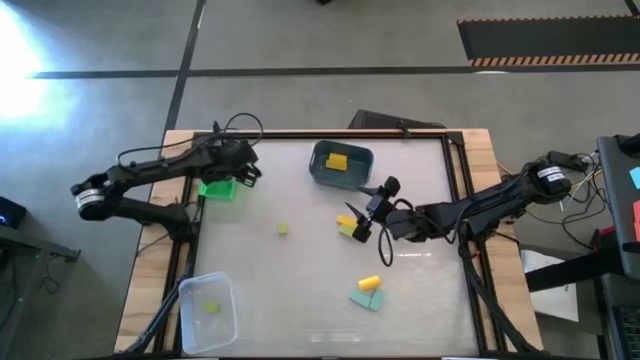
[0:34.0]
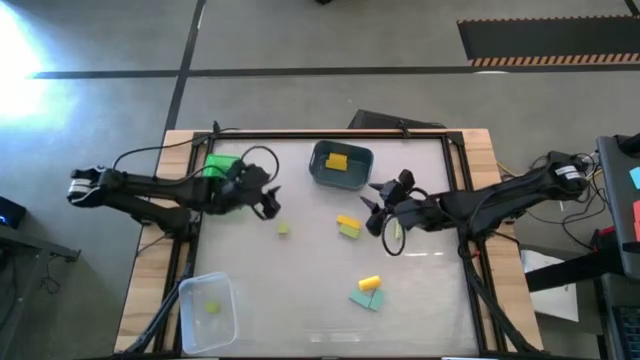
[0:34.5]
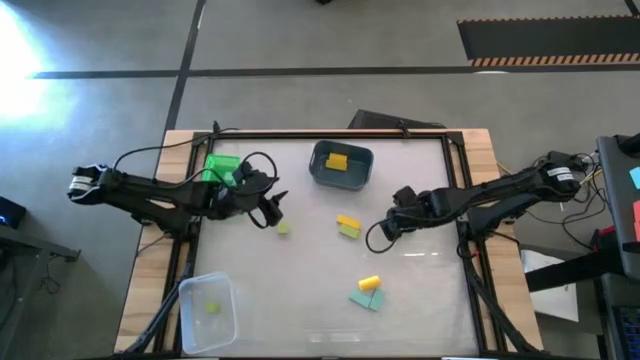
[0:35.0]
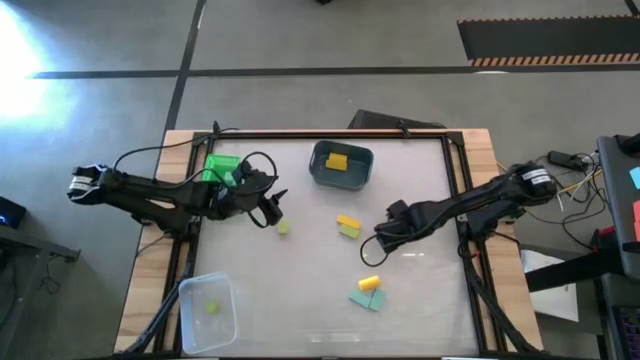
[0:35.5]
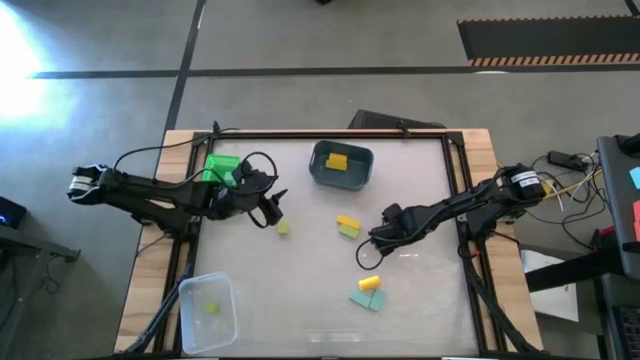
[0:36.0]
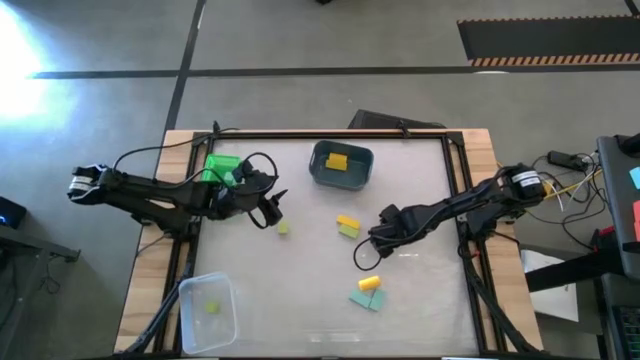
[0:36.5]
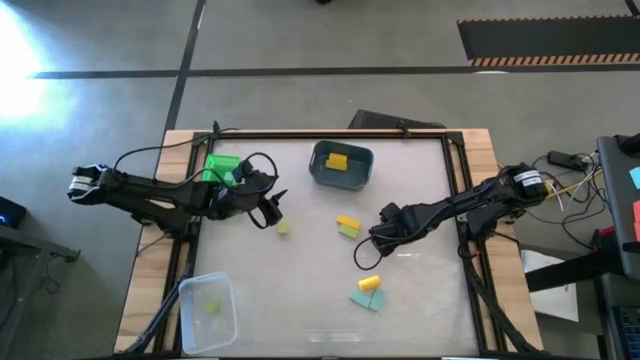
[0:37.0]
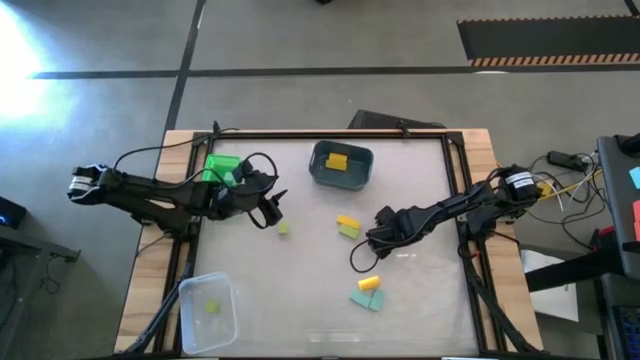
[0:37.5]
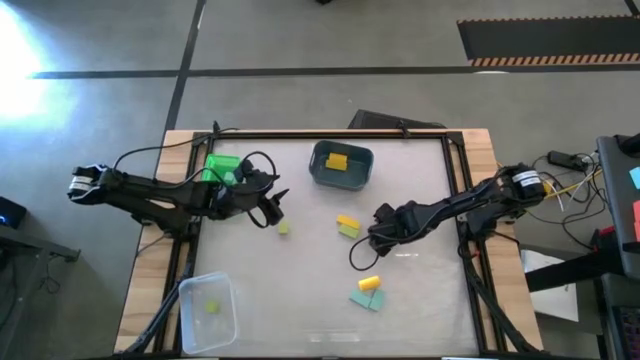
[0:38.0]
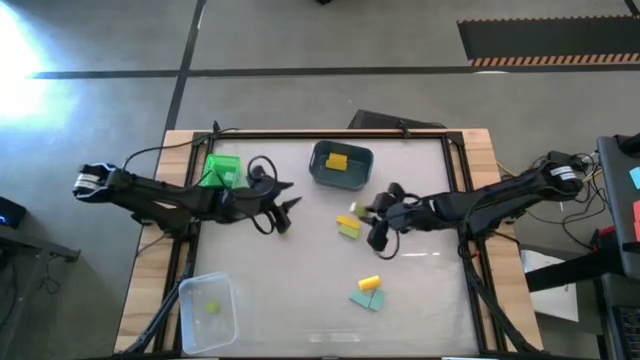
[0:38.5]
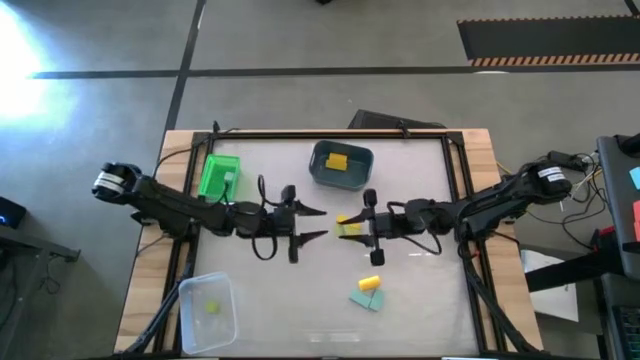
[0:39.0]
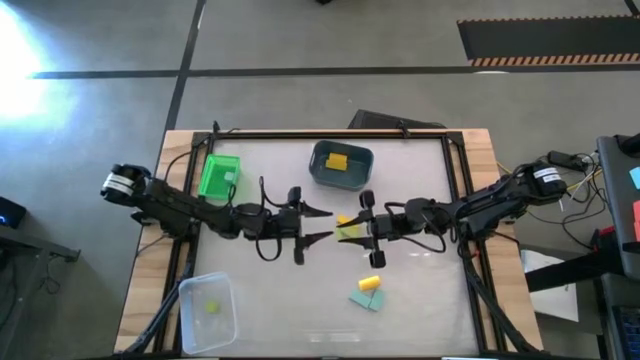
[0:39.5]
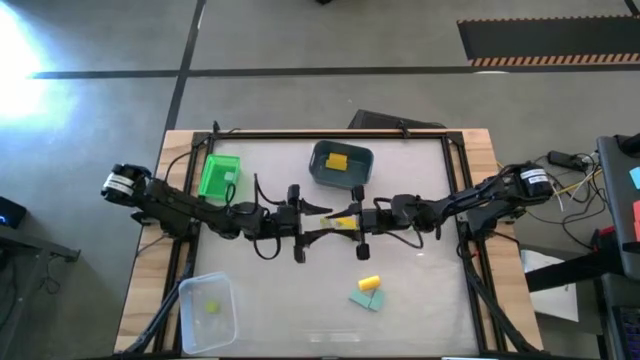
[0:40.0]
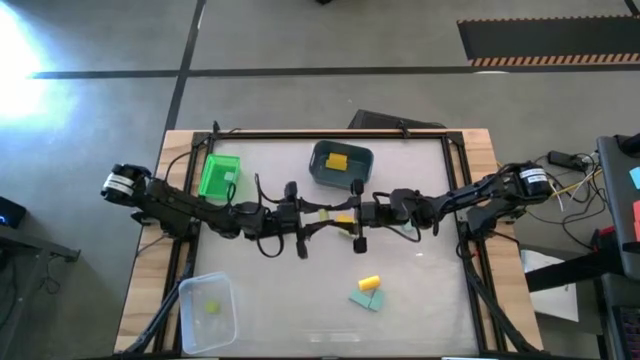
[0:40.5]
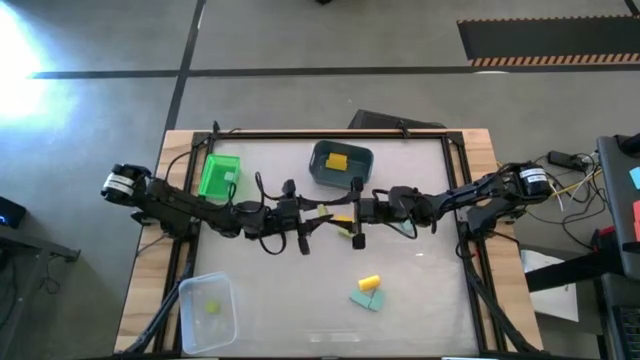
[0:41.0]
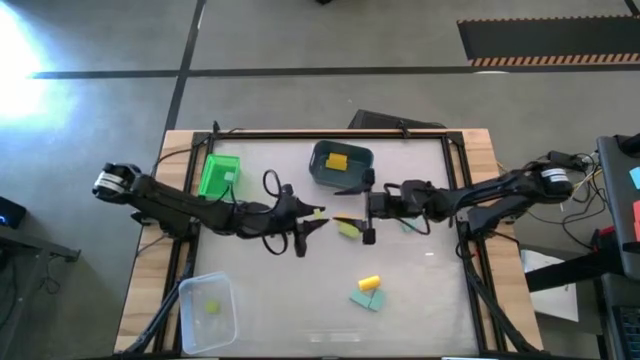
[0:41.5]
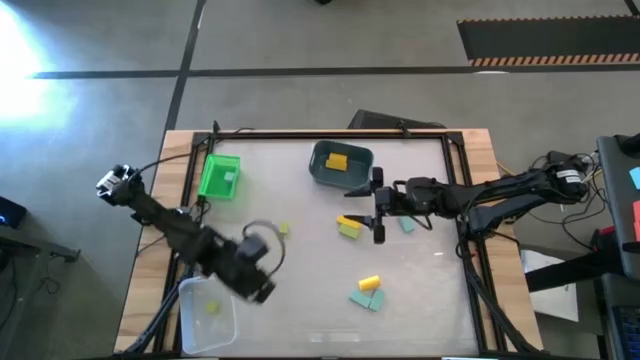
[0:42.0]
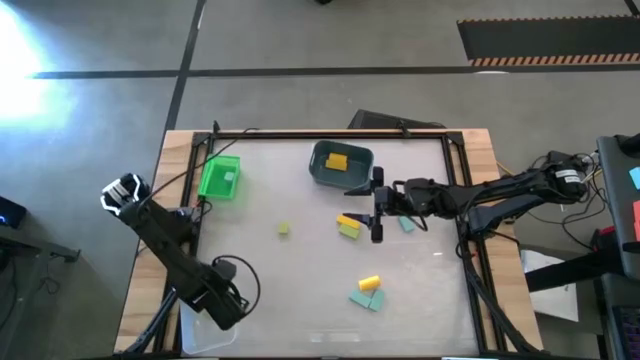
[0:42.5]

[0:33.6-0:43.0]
Task: Sort & place blocks by color
Put the green block into the transparent bin

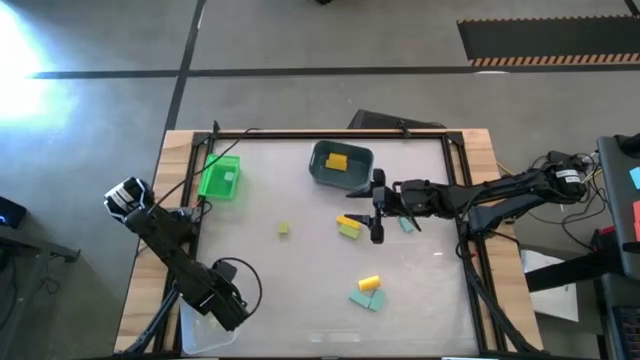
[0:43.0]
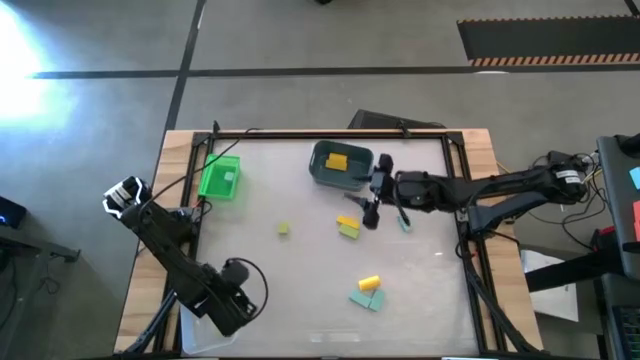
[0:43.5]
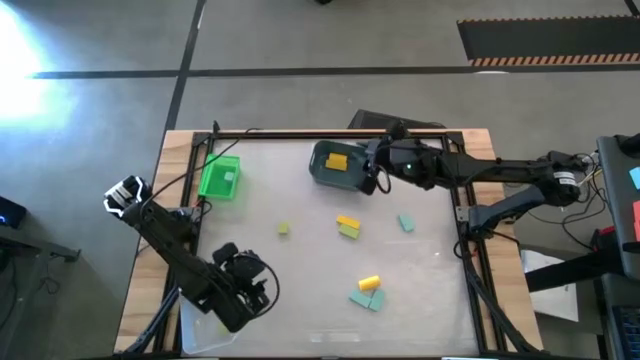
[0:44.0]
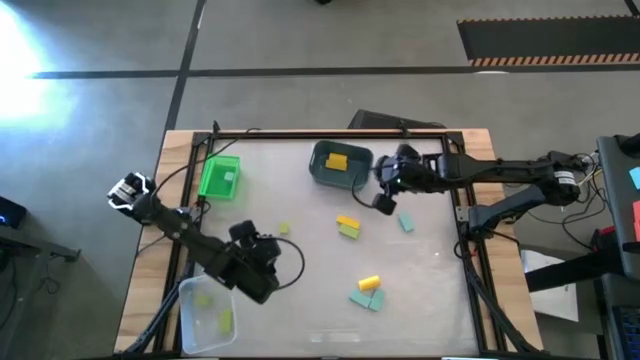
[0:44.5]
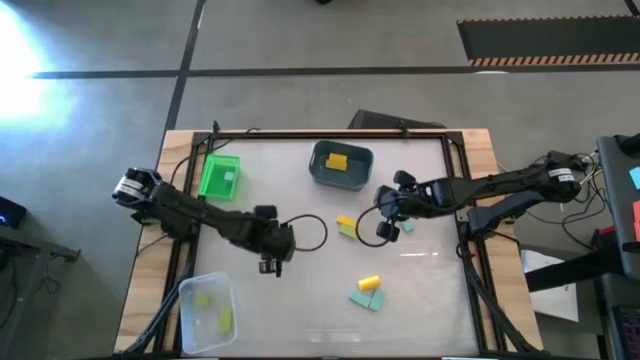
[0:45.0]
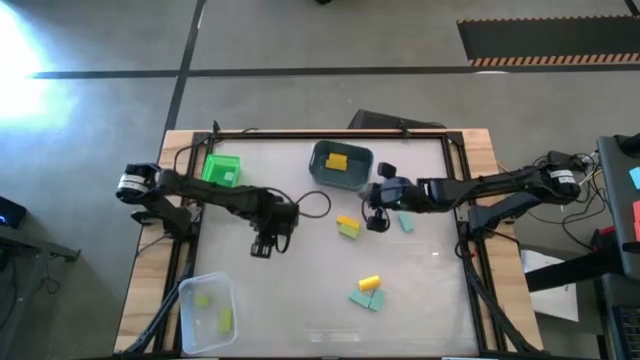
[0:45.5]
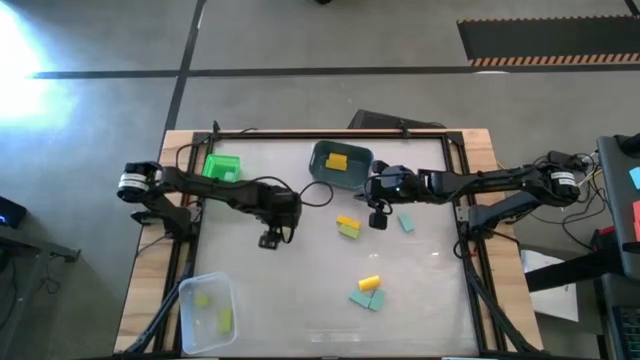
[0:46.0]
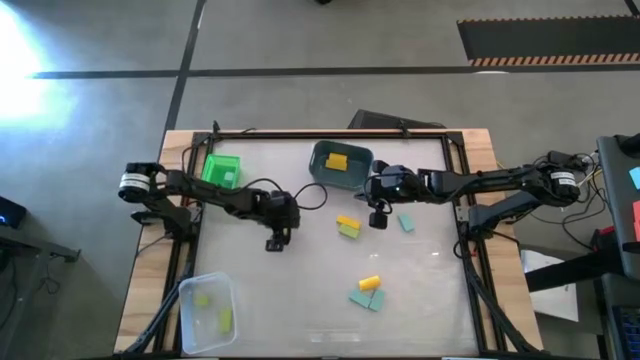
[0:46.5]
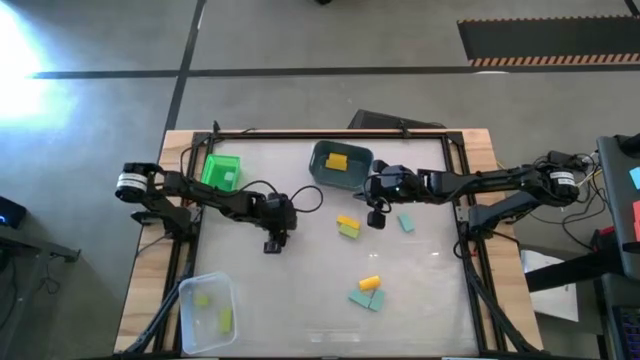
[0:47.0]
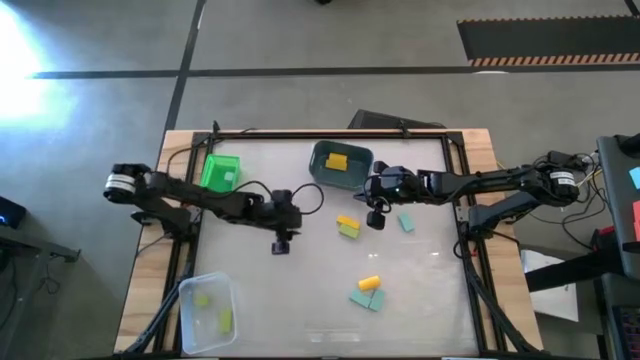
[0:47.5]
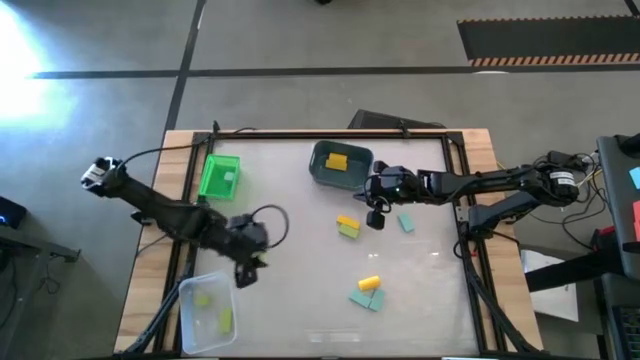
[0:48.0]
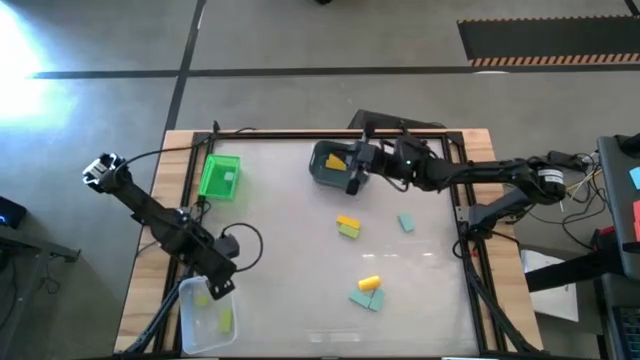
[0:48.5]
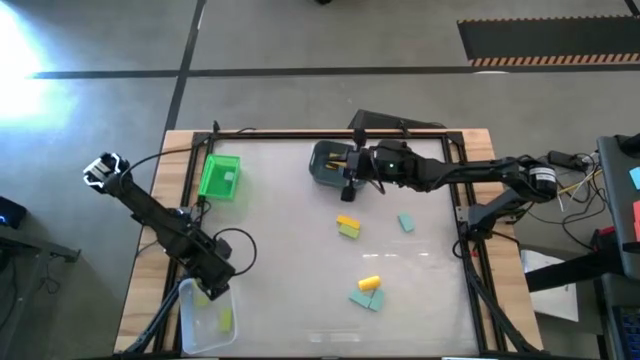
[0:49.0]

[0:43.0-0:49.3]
Put the green block into the transparent bin

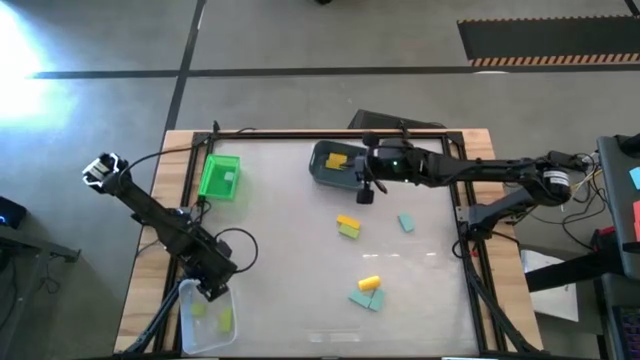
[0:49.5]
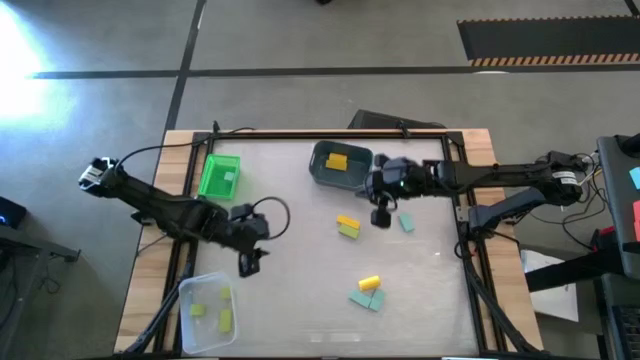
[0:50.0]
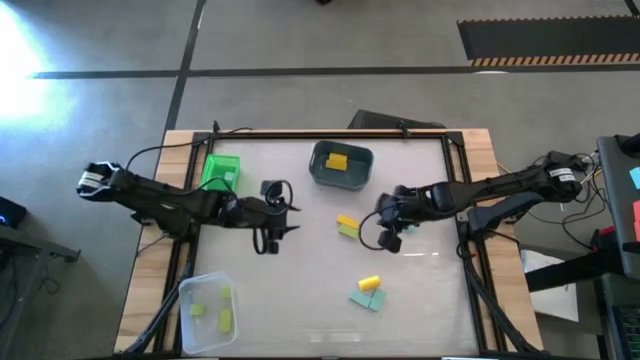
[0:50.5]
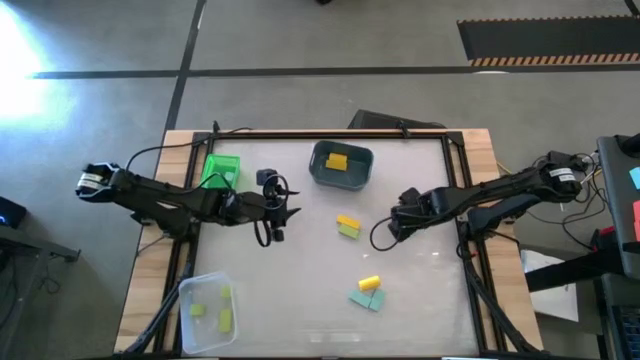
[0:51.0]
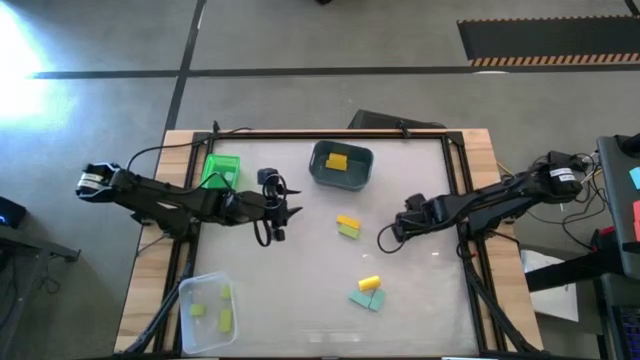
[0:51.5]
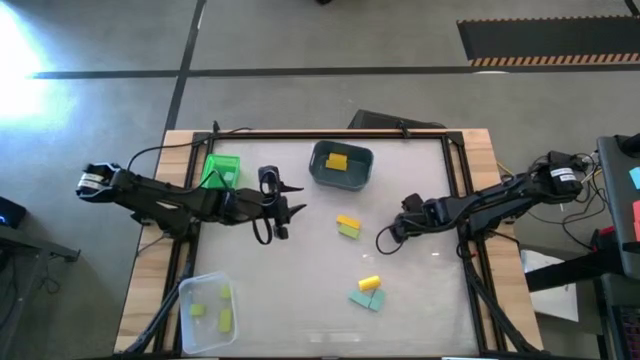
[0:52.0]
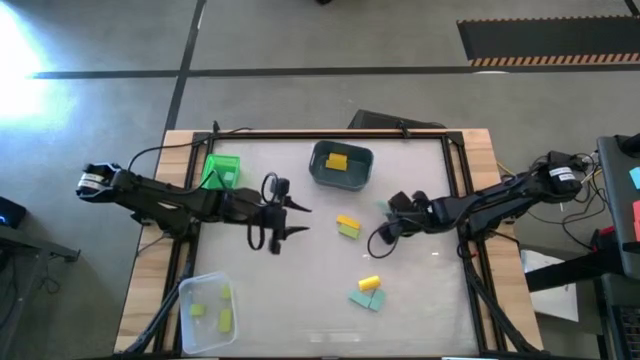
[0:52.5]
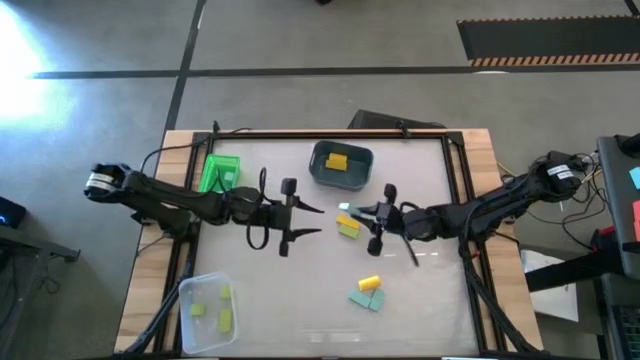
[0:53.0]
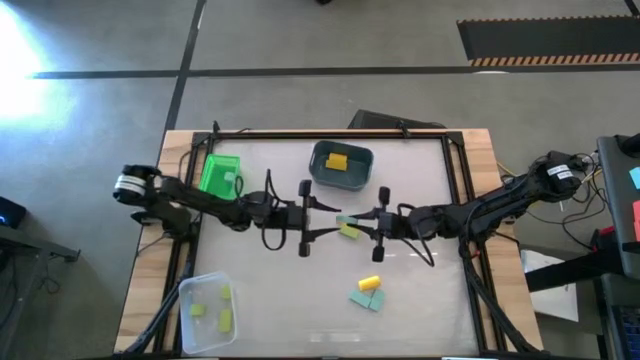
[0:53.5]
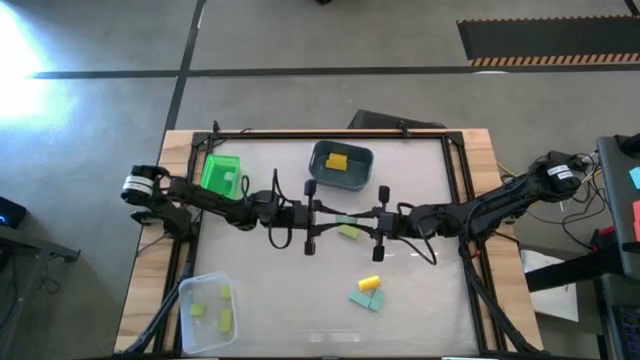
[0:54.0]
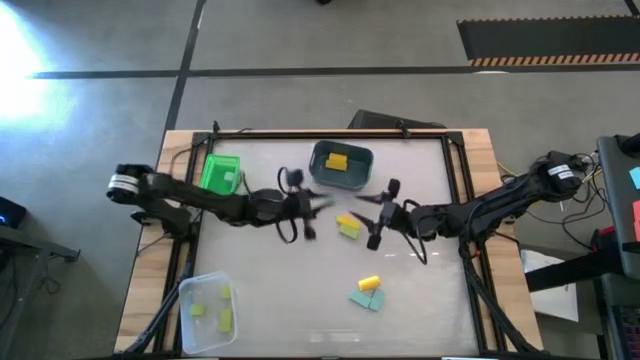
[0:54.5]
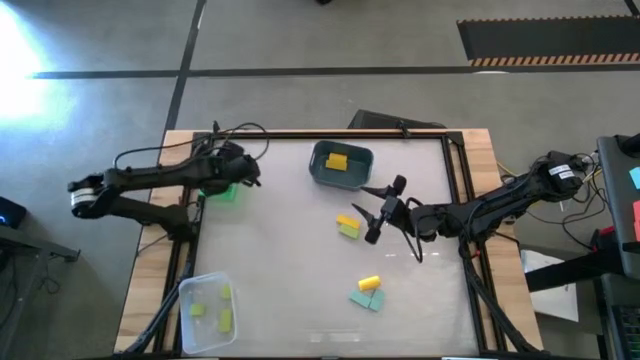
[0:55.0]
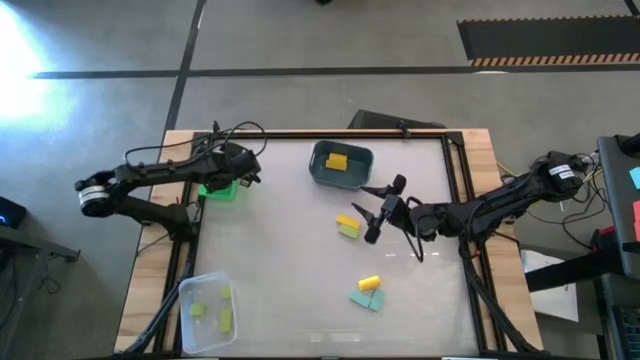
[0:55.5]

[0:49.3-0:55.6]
Put the blue block into the green bin
